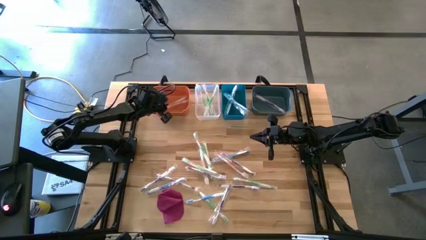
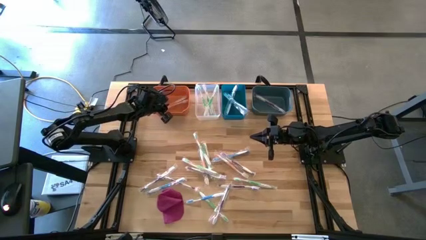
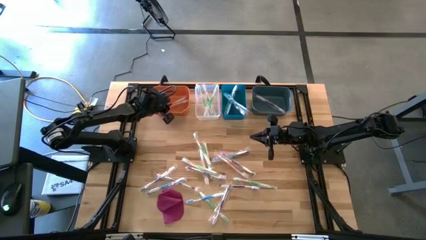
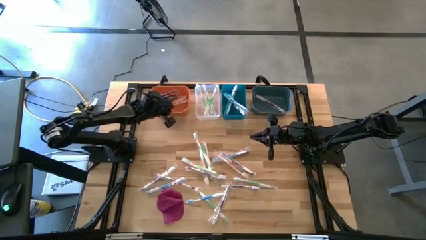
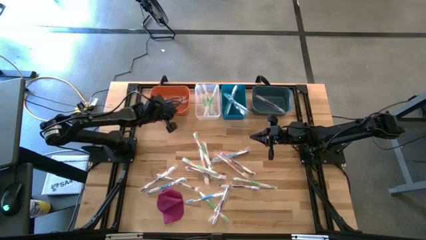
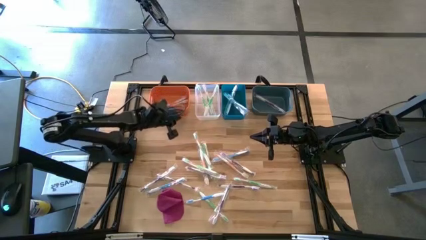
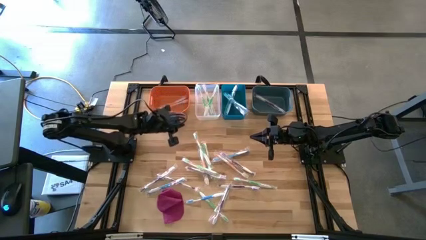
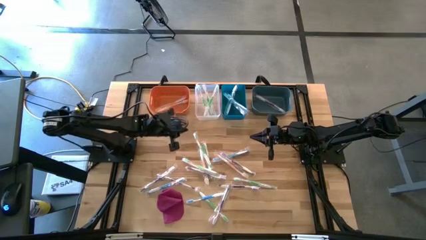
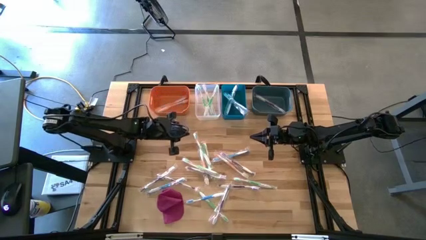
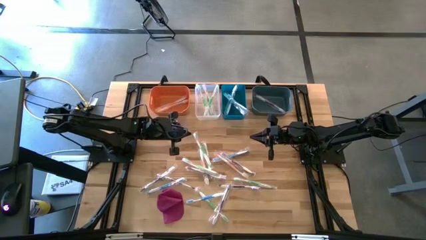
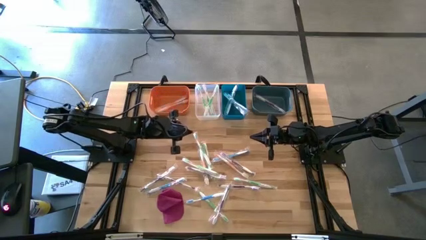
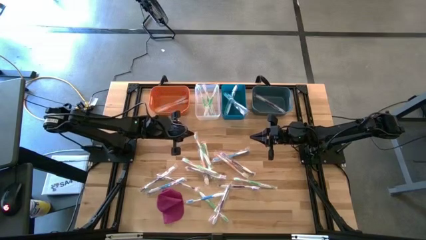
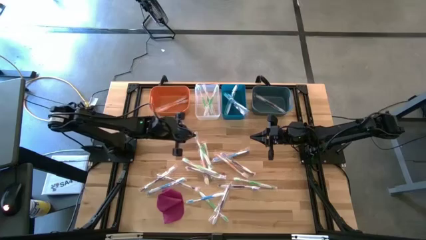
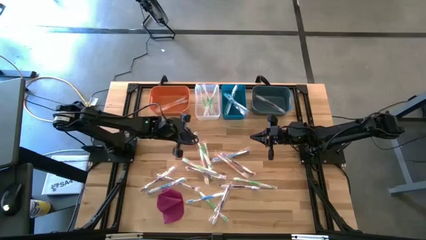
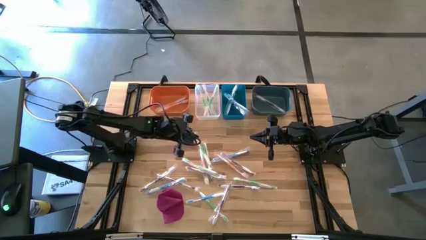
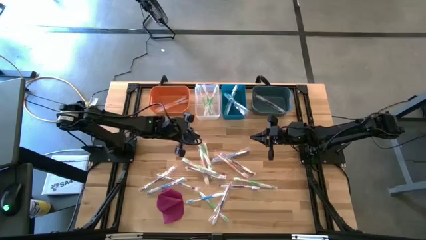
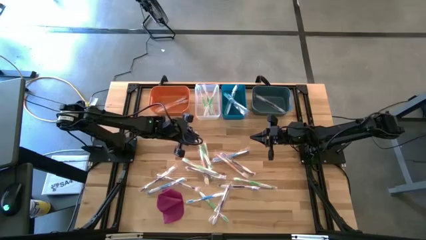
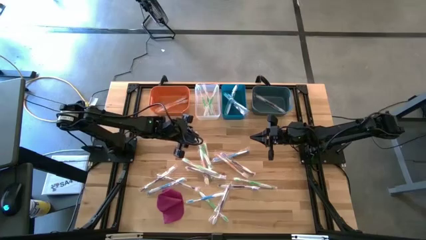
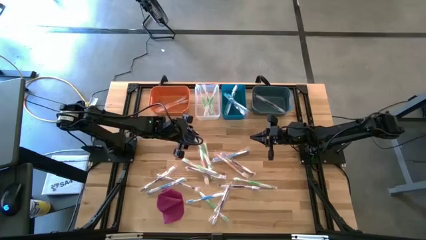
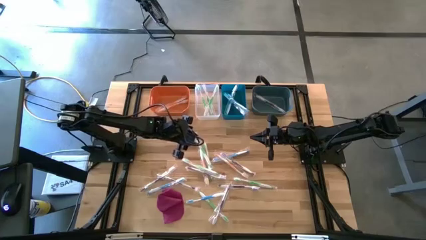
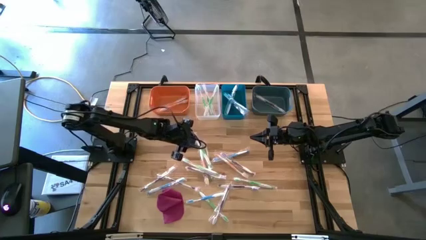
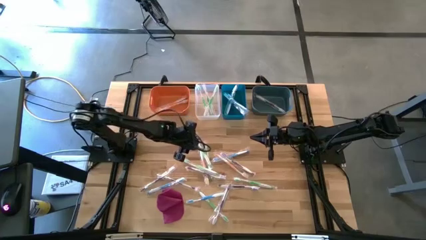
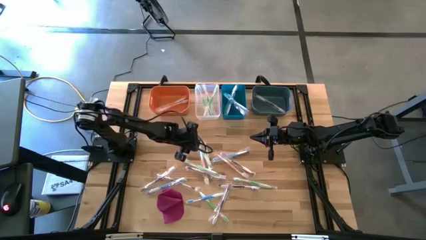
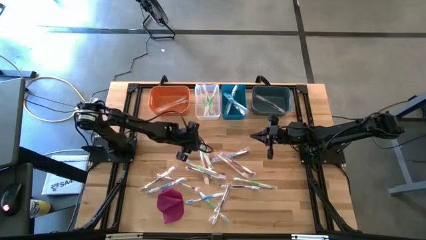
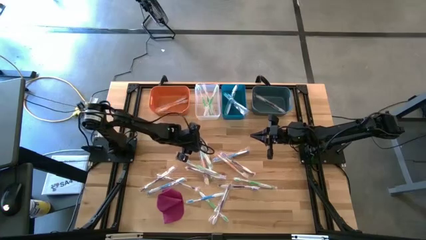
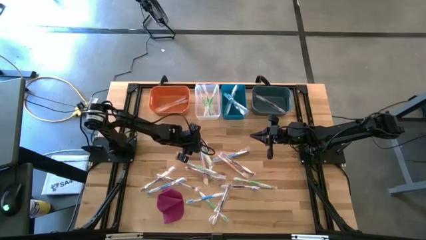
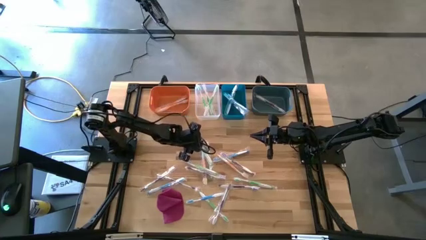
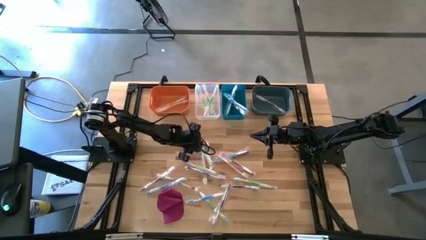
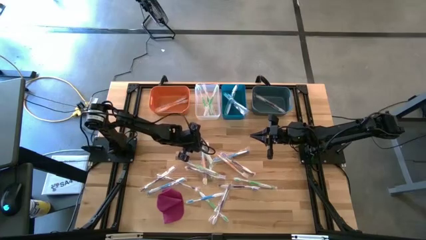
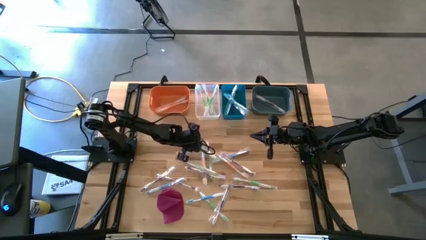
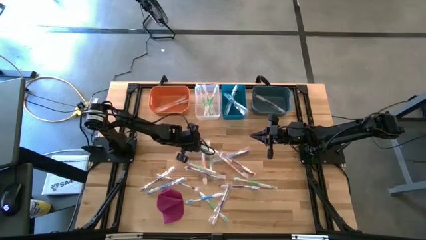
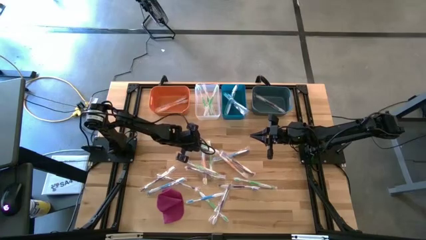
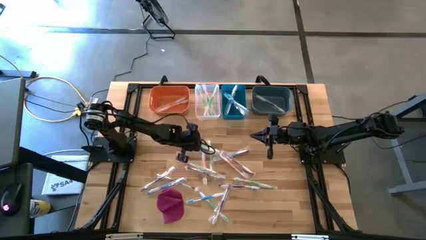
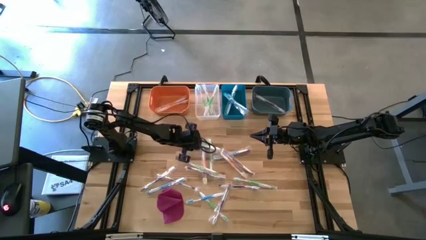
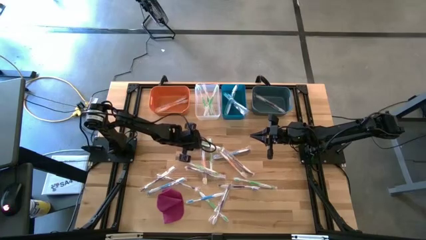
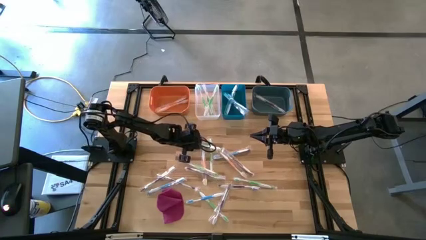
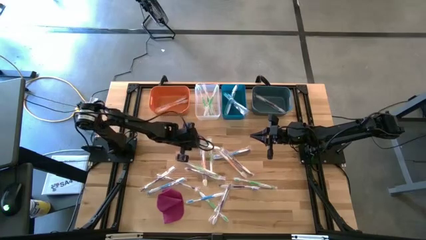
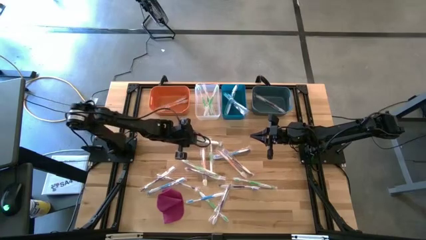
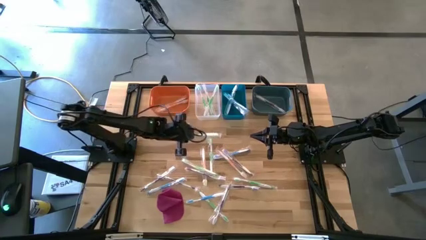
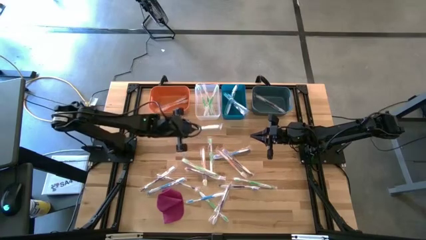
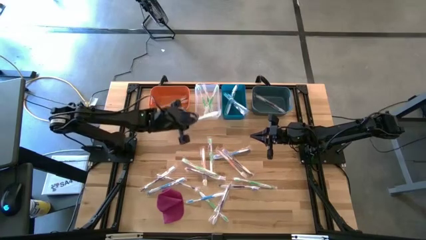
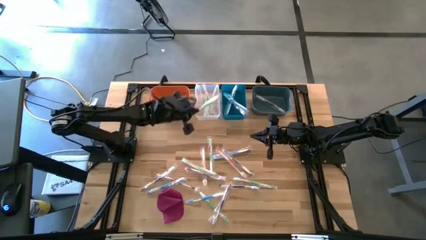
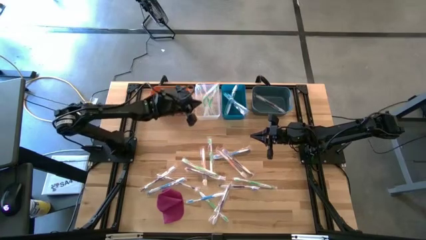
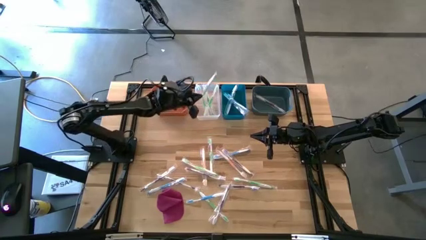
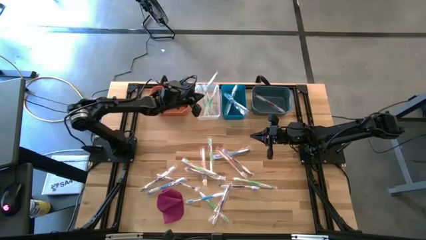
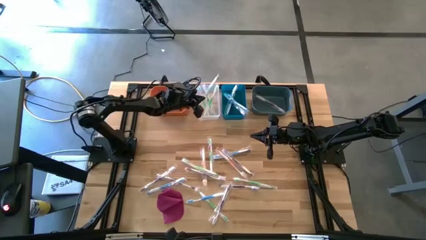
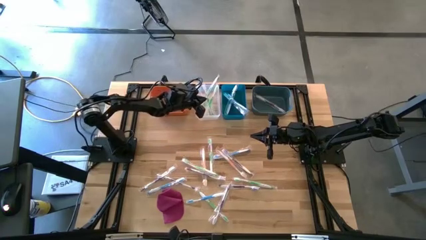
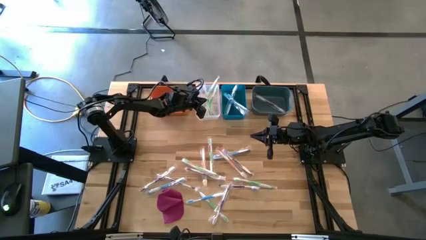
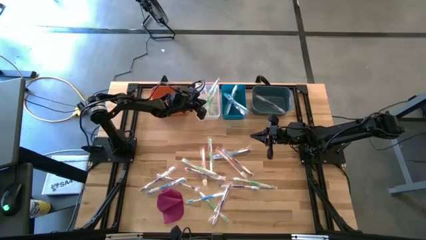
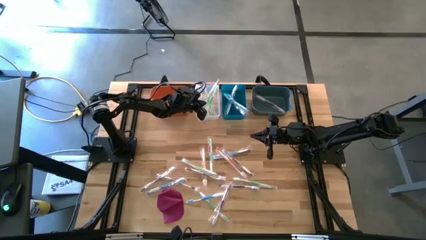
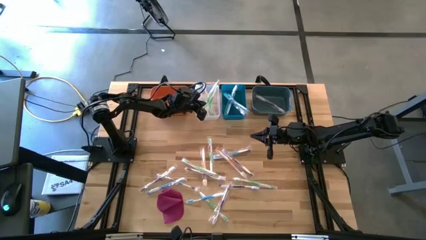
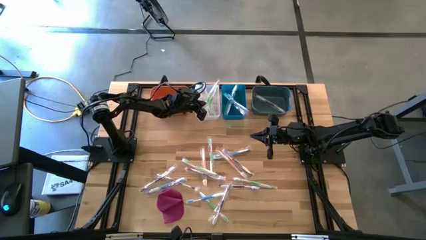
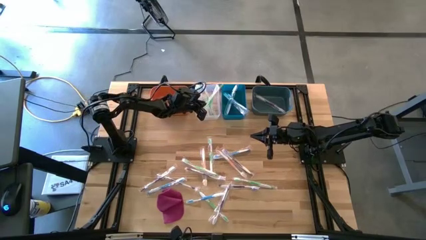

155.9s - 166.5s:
Task: Pick & Place Toothbrushes
Put the green toothbrush into the transparent bin
